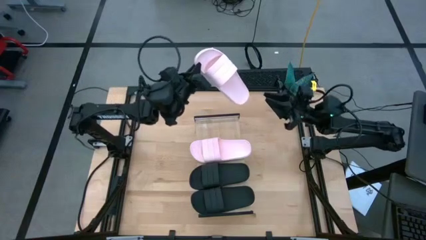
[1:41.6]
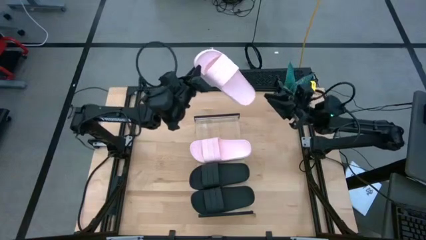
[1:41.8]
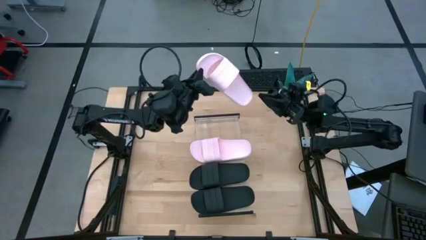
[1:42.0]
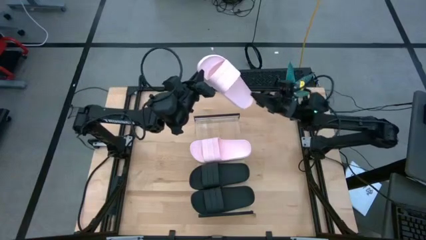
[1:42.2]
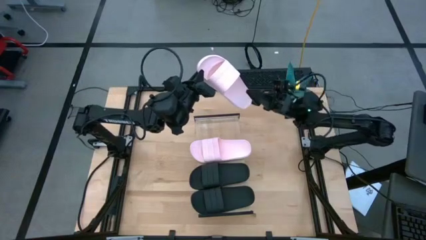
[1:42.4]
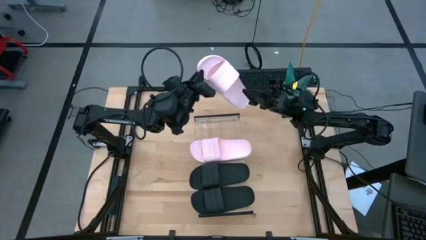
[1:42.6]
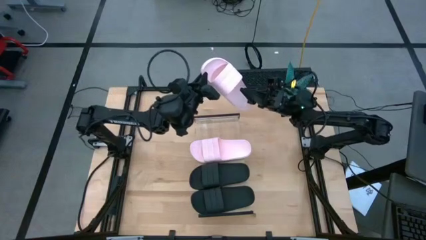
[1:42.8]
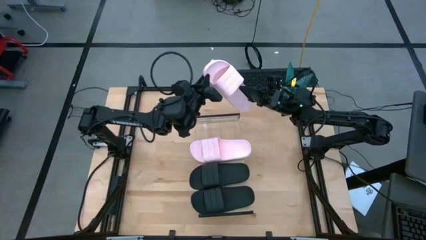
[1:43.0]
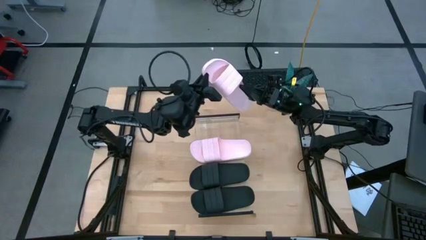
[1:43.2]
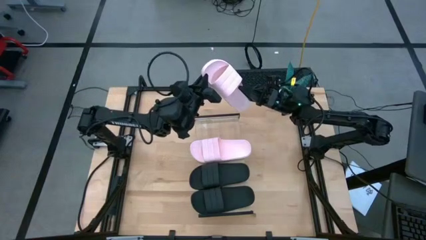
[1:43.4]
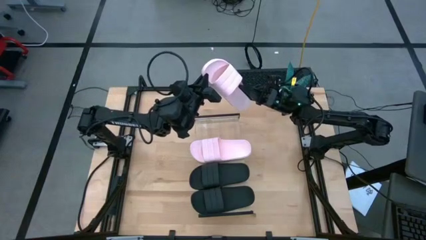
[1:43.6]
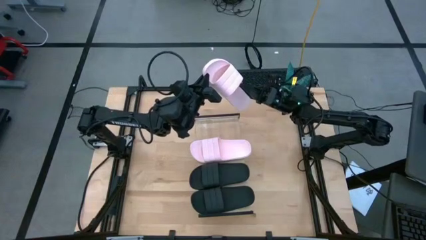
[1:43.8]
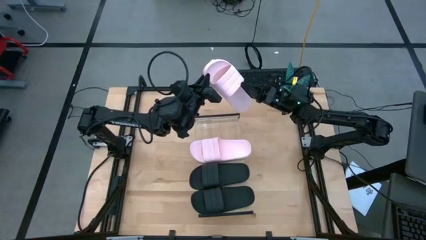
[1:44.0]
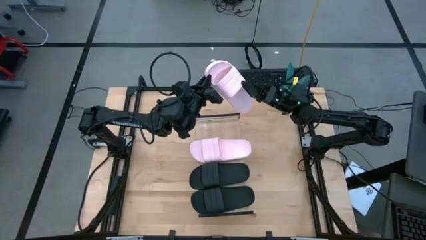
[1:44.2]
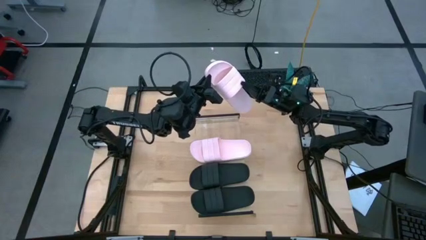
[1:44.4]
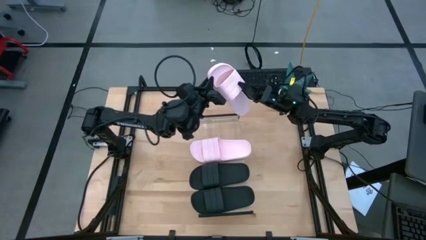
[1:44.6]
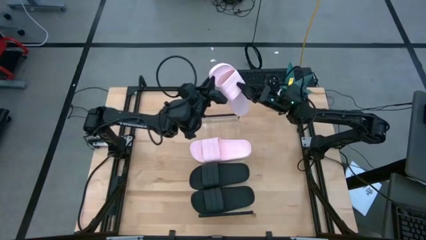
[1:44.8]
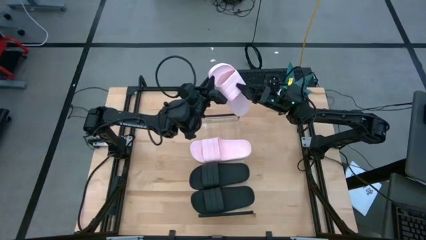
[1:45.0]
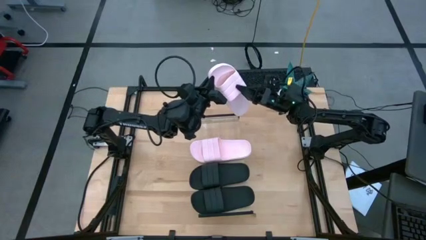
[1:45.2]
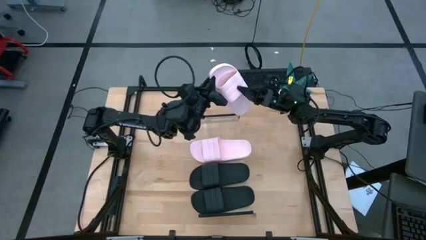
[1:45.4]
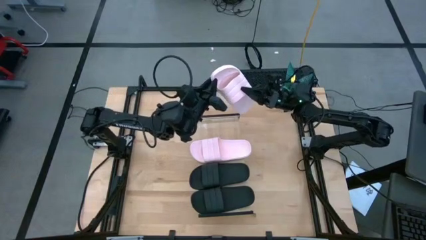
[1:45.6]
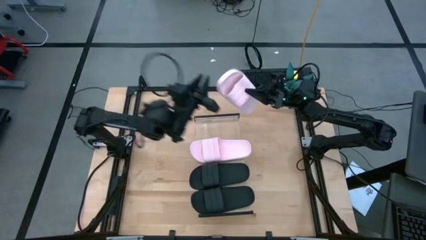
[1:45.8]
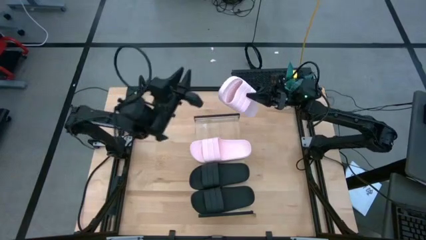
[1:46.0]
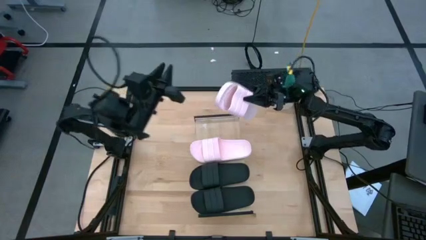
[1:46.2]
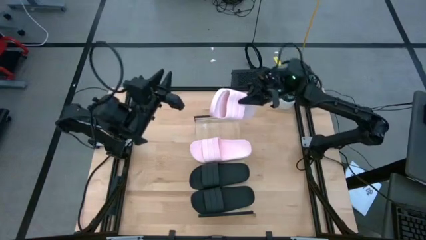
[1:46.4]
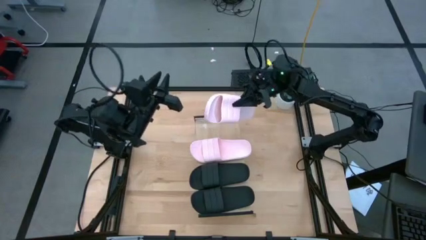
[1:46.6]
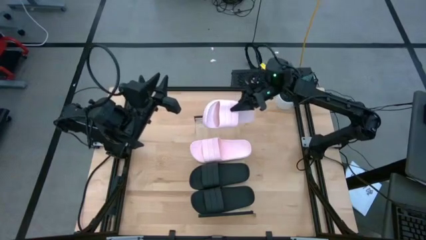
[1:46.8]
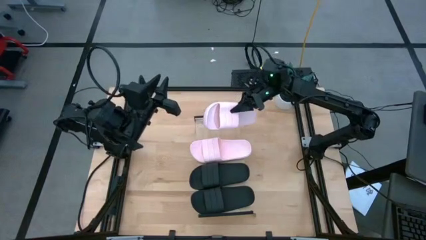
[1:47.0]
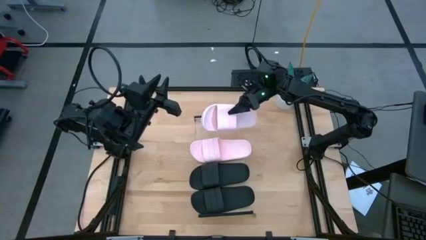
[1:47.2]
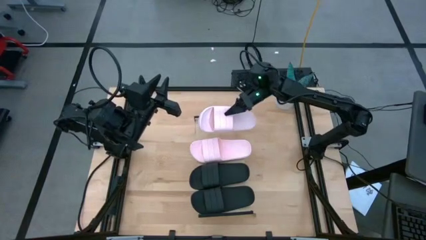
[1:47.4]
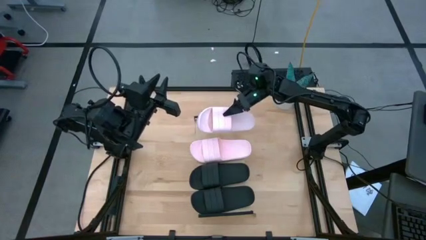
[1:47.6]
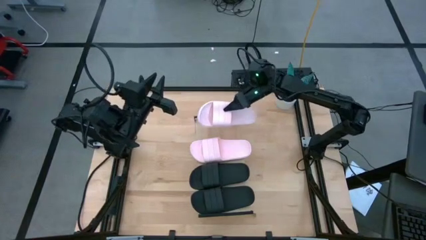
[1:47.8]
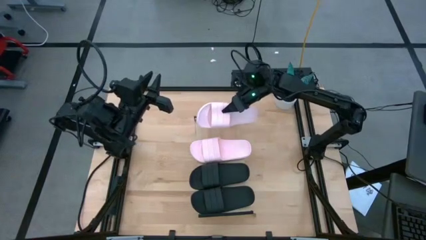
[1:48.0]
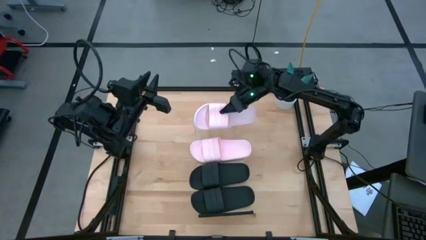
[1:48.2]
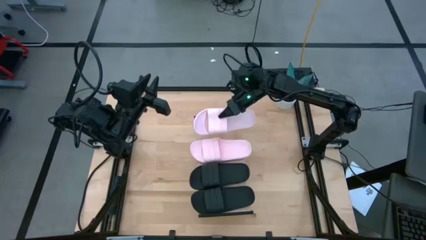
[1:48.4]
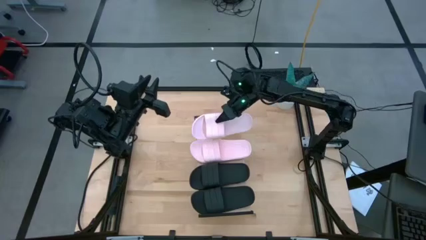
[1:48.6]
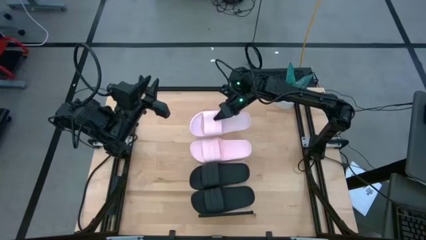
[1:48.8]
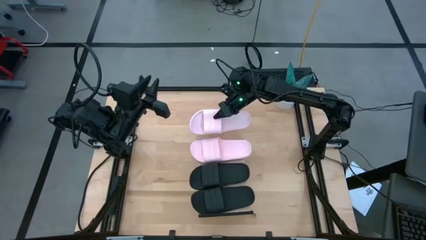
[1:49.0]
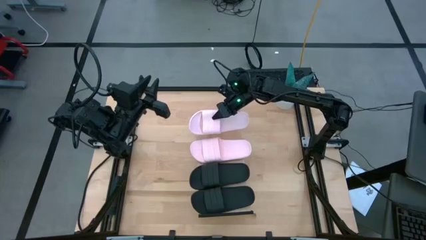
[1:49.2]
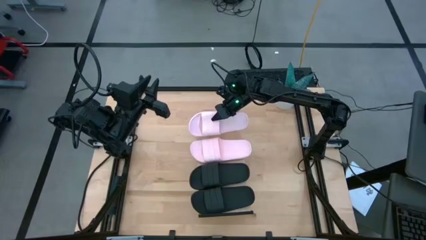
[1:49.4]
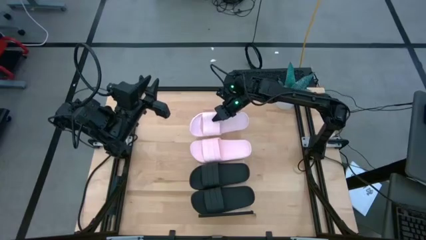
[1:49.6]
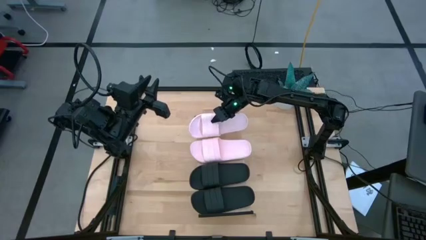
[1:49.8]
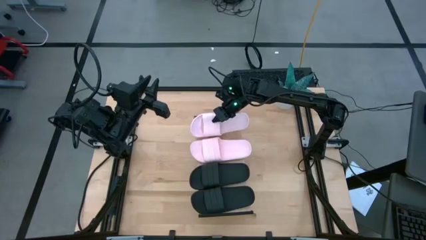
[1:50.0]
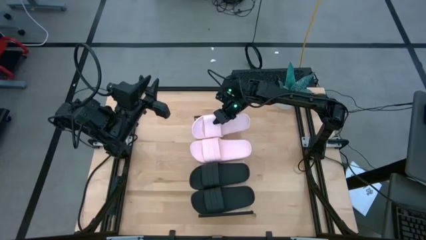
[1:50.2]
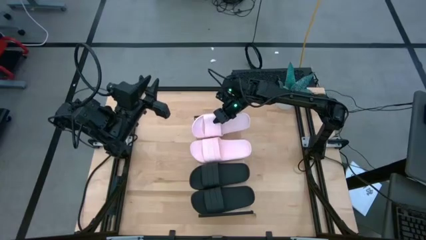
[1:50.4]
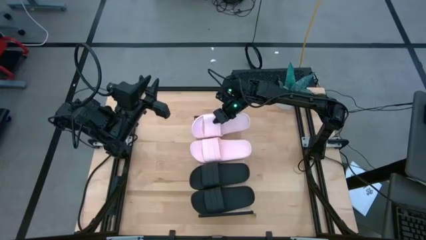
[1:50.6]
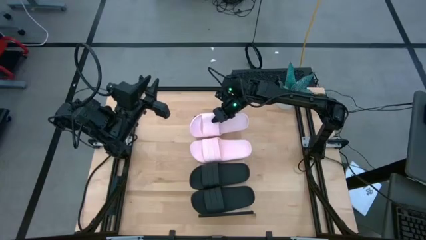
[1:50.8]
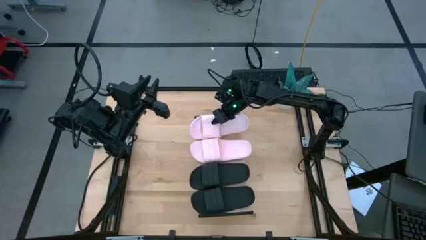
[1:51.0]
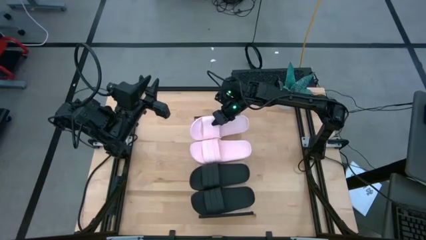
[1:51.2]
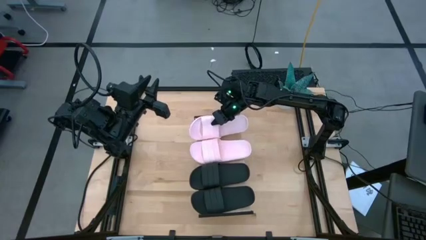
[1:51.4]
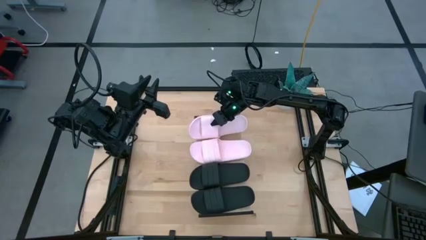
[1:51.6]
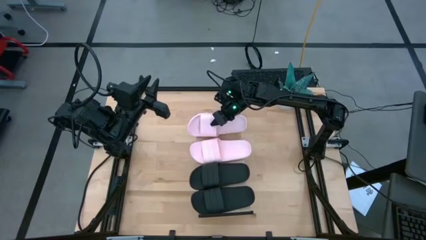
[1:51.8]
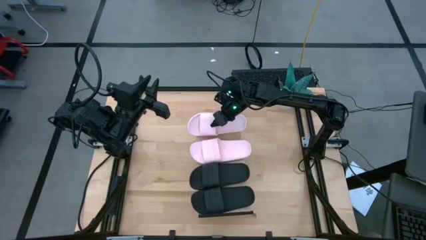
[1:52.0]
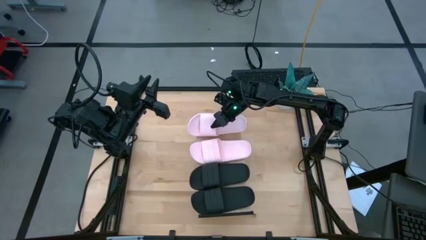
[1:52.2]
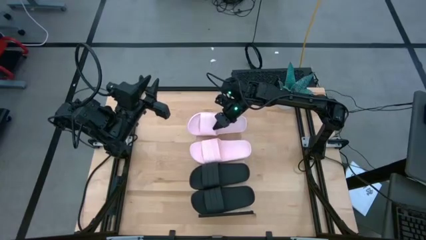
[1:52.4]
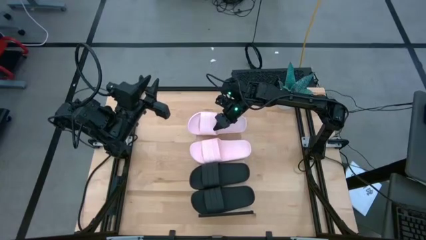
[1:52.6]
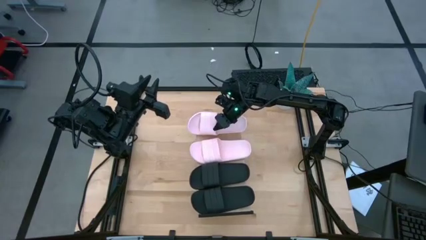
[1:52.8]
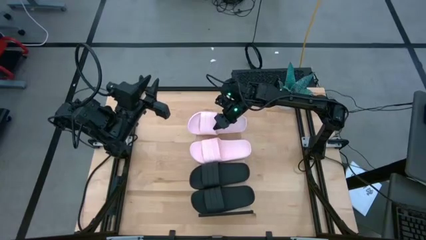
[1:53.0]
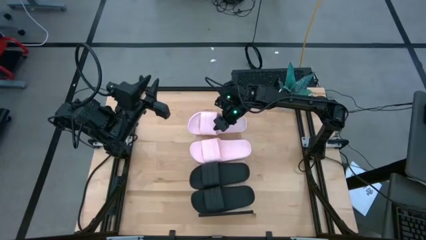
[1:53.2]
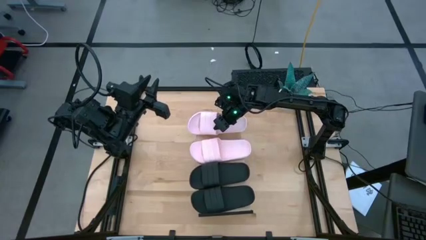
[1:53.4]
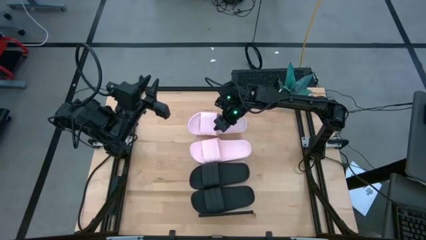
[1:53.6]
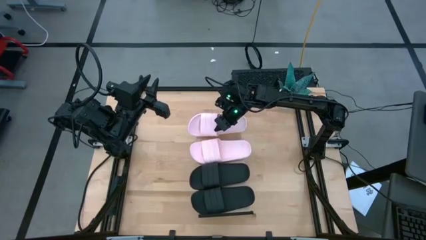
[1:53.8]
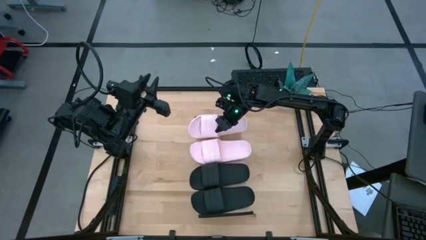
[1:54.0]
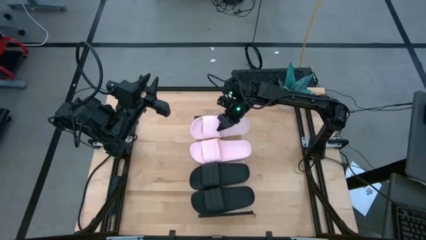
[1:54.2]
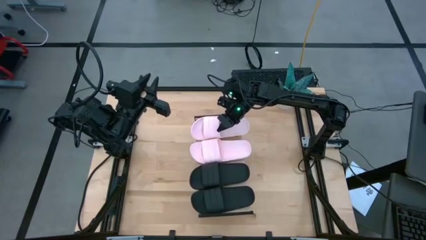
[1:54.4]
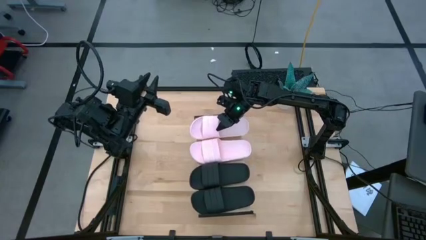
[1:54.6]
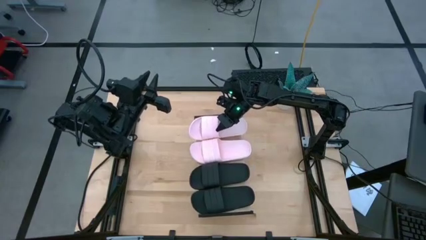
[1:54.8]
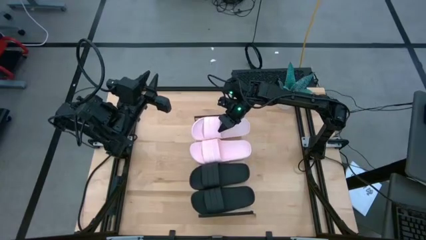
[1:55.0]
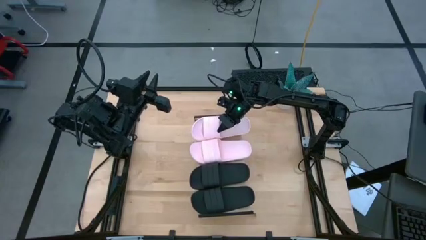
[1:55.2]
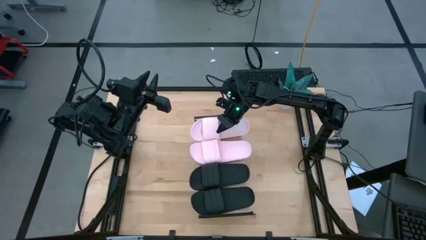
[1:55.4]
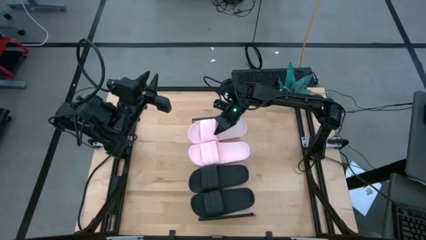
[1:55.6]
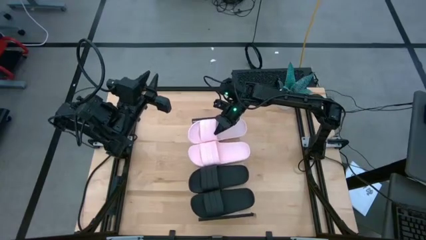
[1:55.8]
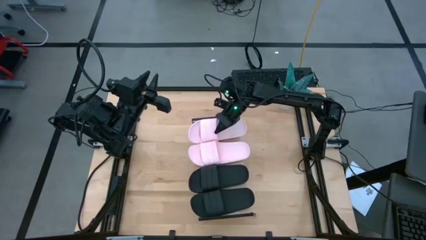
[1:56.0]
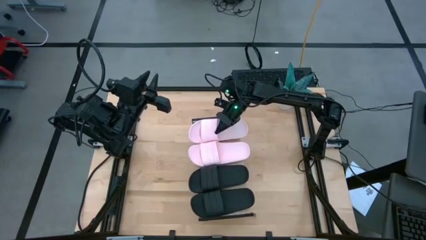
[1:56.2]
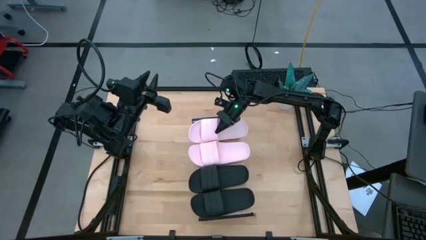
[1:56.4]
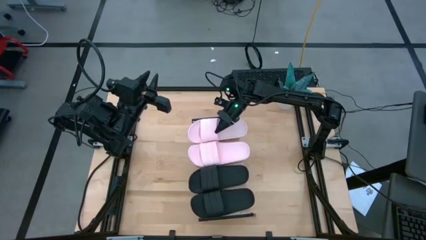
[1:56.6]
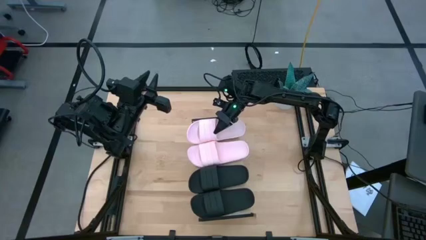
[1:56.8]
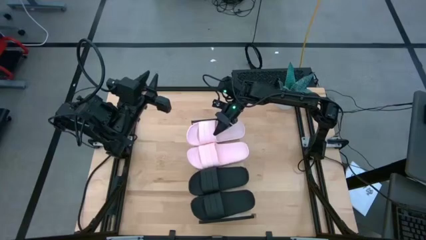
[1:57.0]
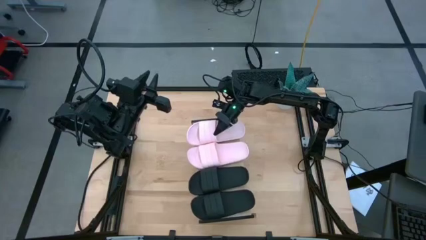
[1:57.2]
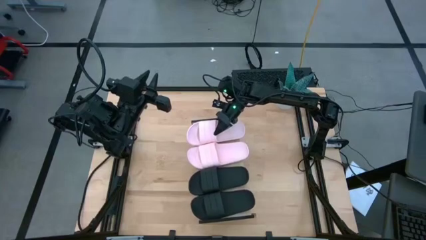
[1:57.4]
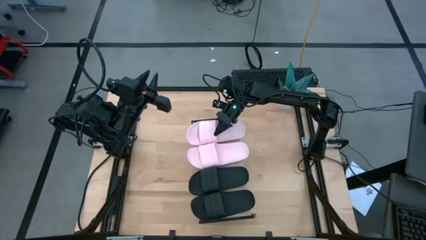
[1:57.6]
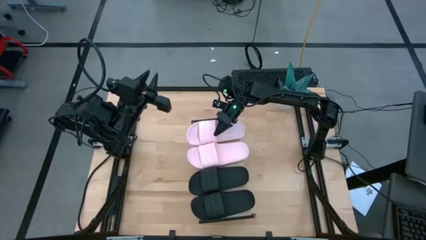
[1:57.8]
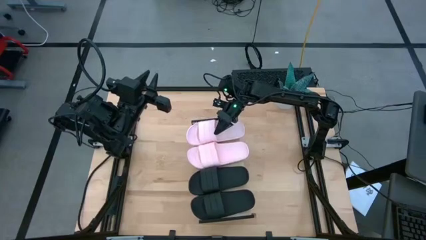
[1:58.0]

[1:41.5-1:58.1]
Task: Pick and place slides into the shelf
Put the pink slides on the shelf
